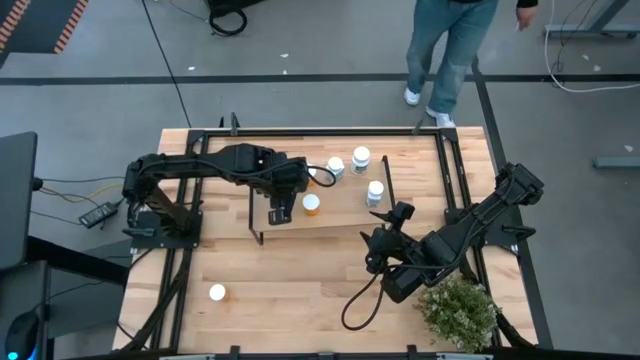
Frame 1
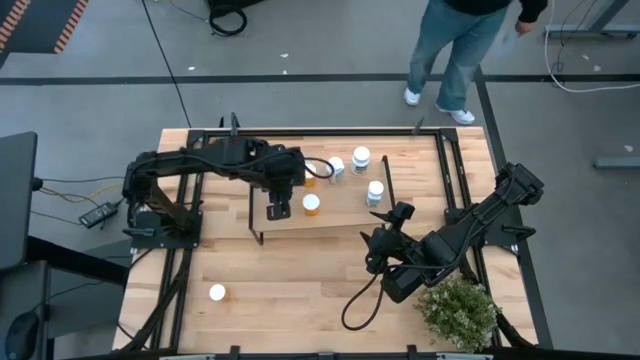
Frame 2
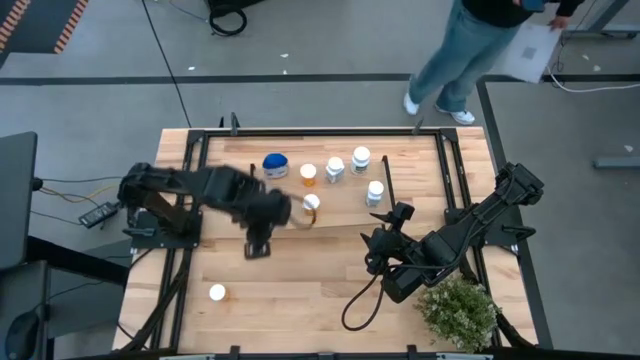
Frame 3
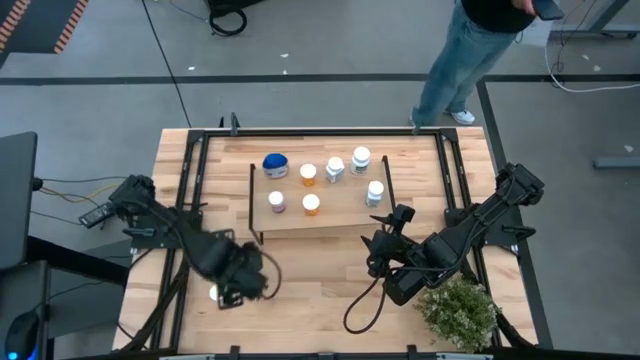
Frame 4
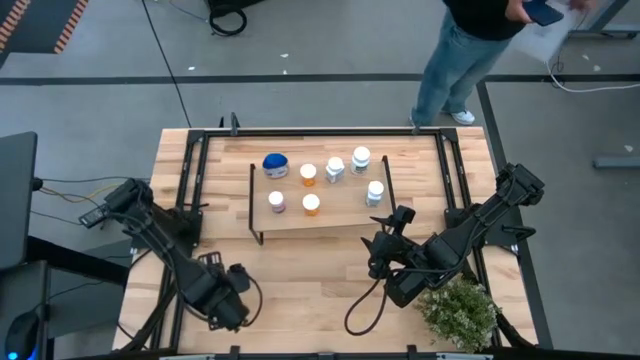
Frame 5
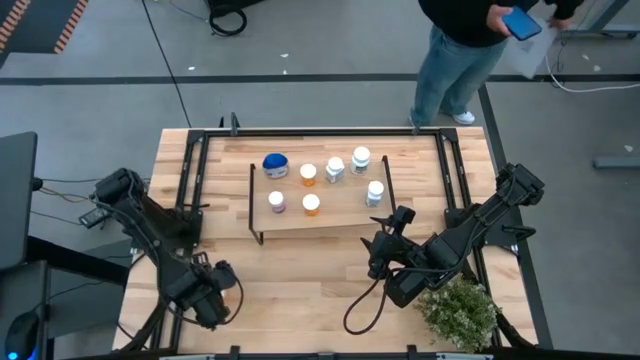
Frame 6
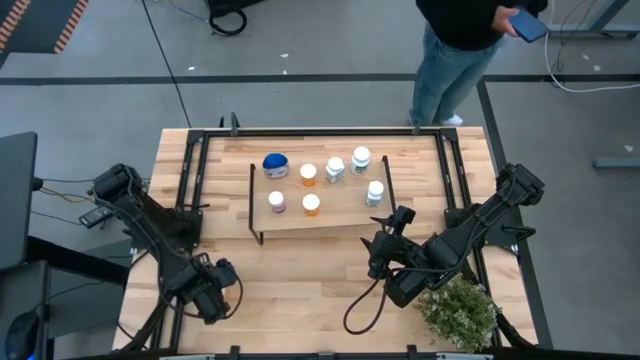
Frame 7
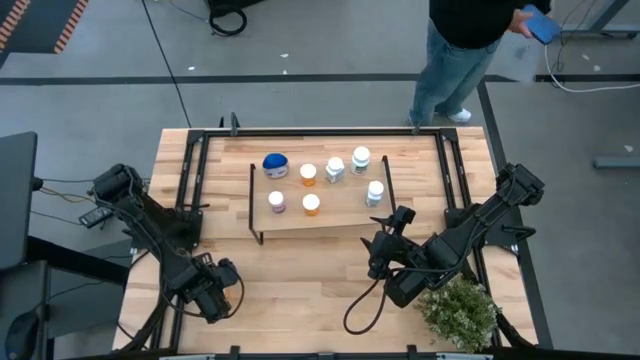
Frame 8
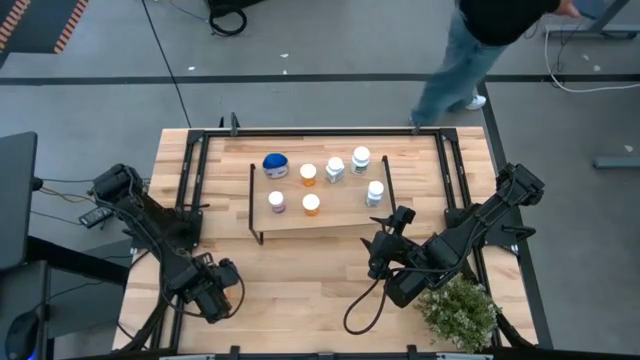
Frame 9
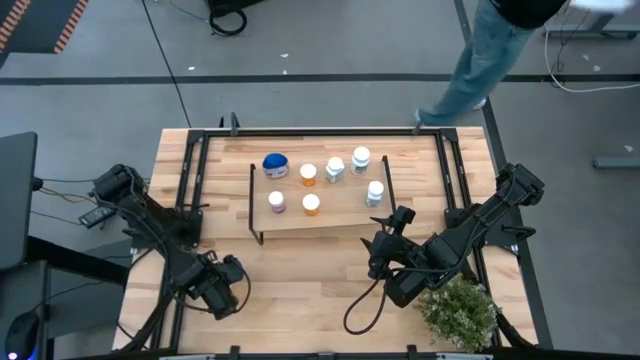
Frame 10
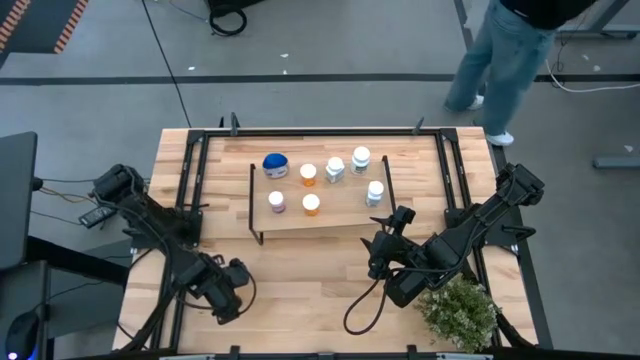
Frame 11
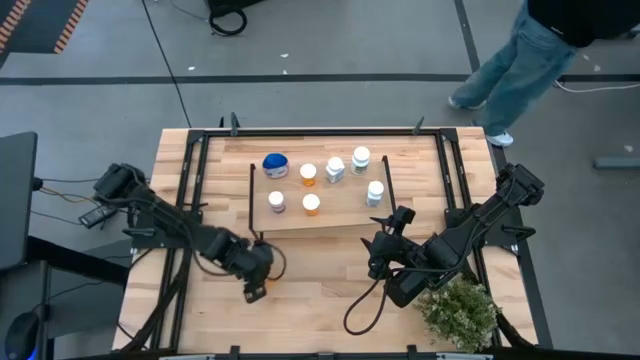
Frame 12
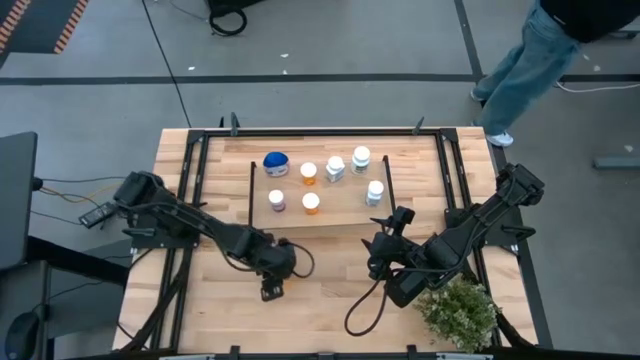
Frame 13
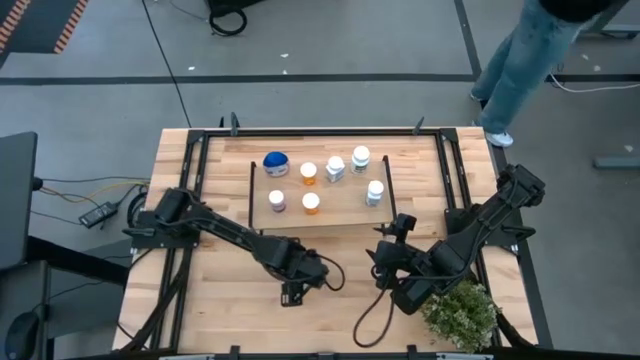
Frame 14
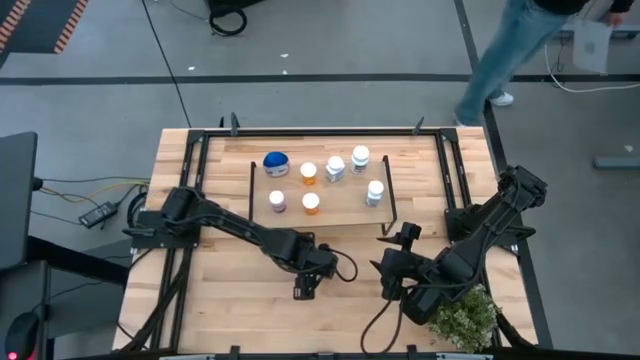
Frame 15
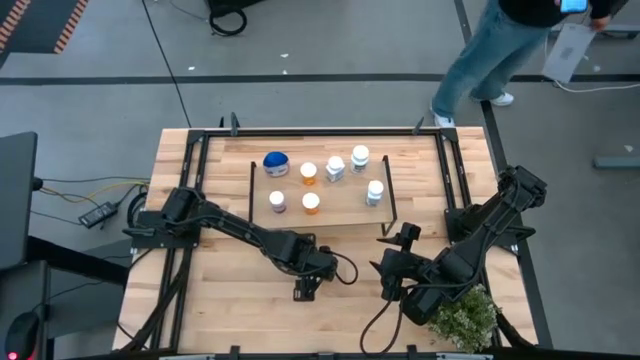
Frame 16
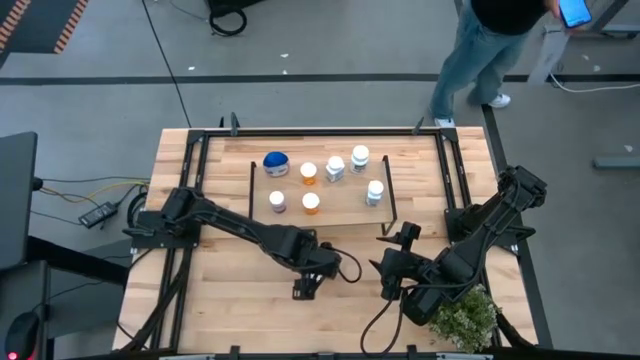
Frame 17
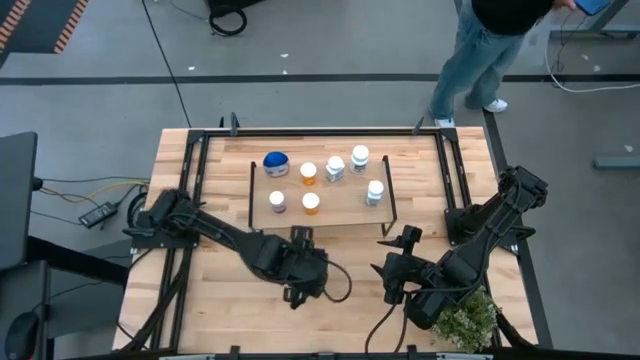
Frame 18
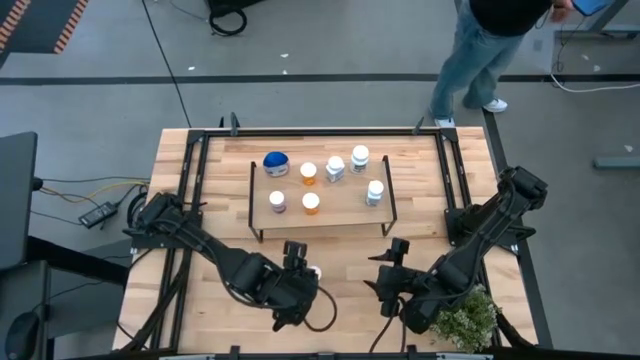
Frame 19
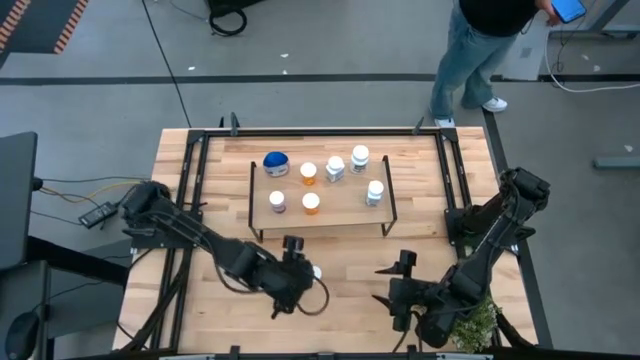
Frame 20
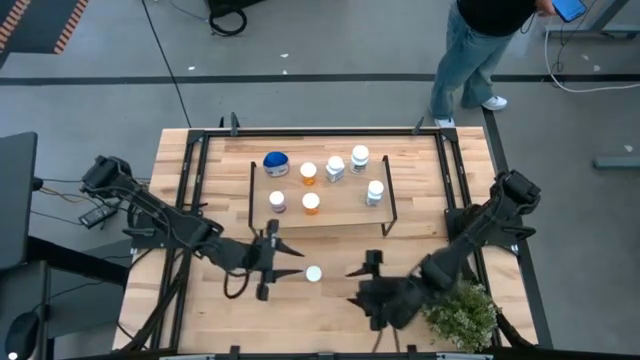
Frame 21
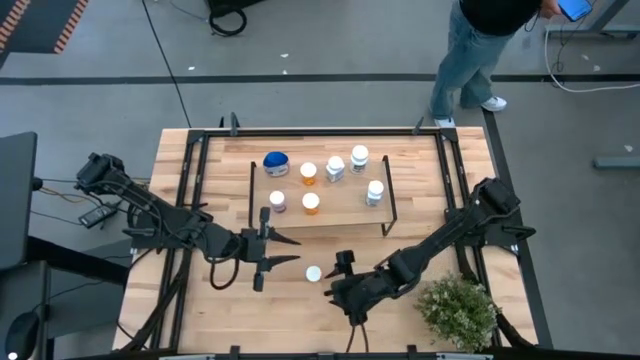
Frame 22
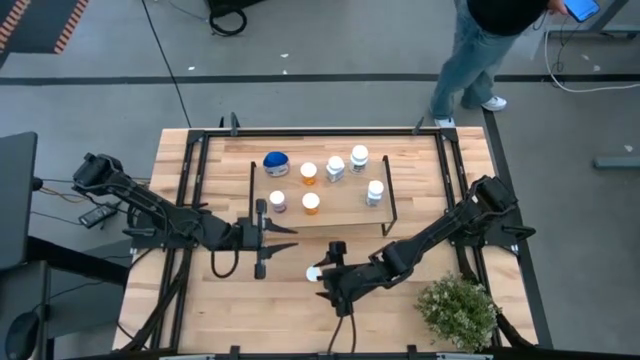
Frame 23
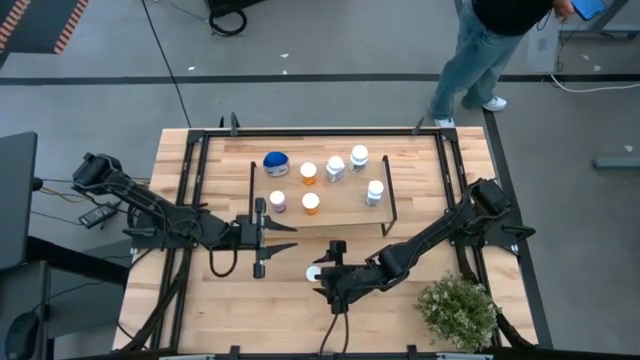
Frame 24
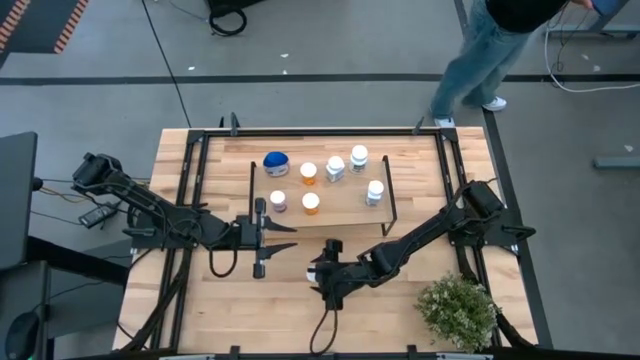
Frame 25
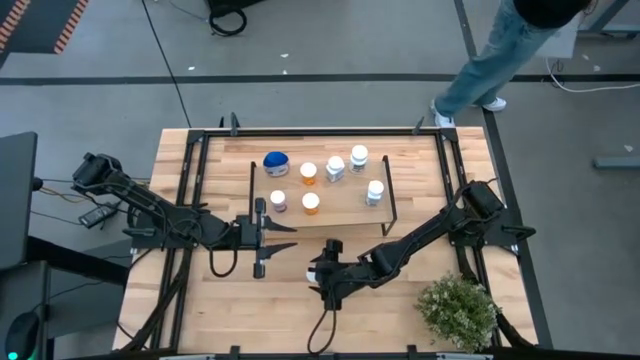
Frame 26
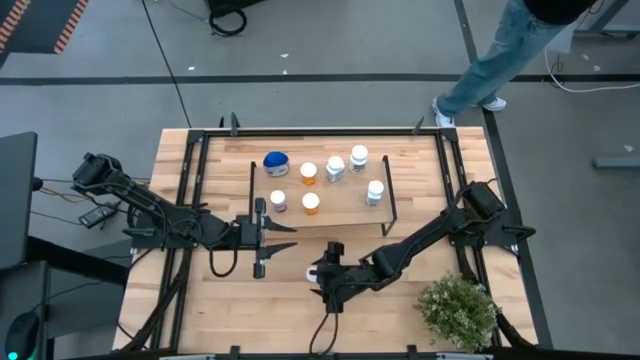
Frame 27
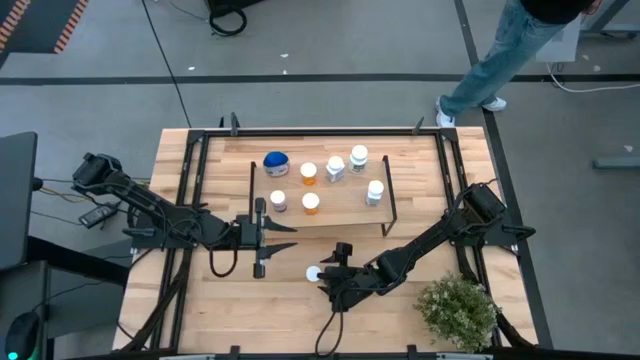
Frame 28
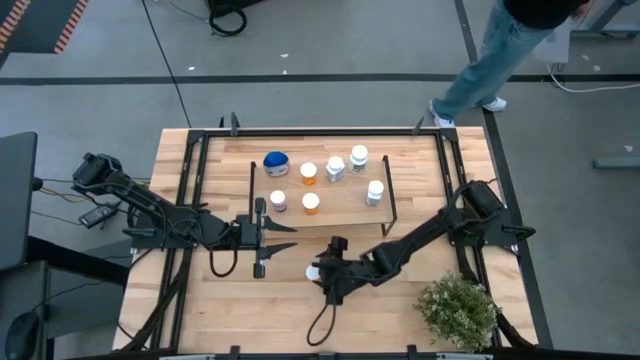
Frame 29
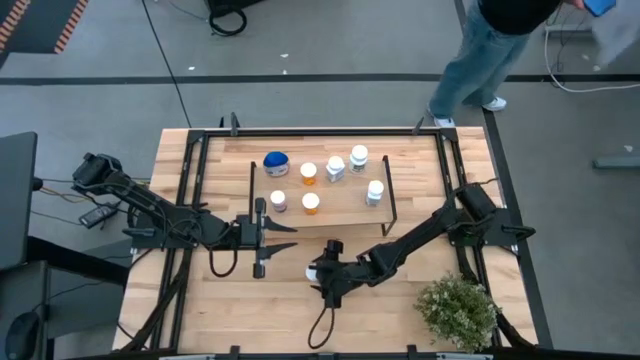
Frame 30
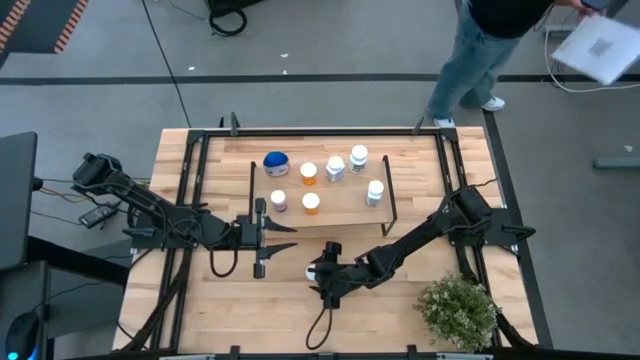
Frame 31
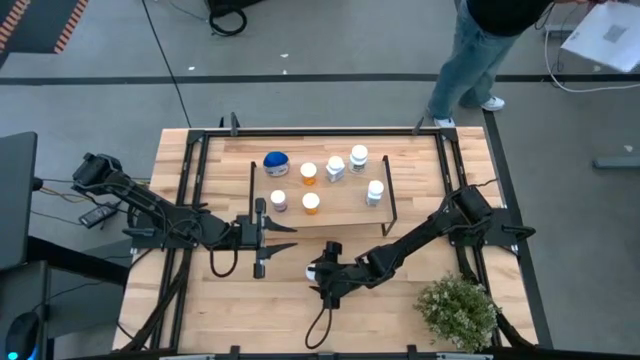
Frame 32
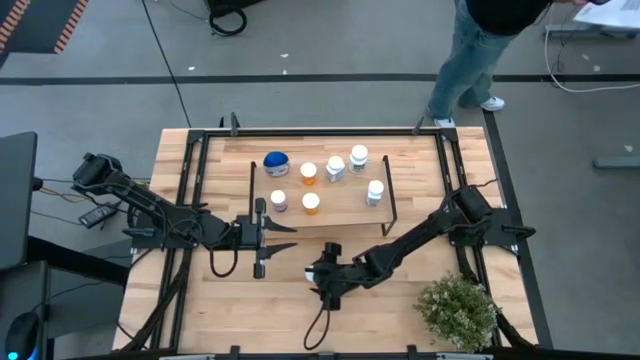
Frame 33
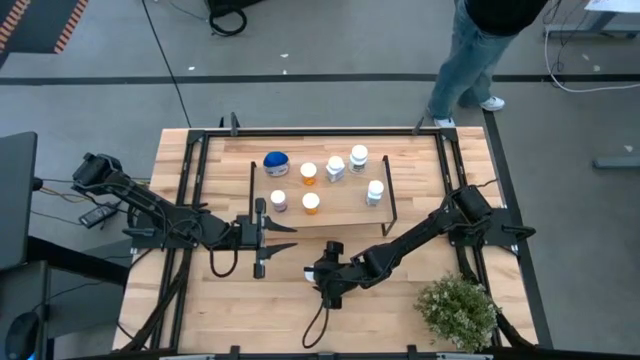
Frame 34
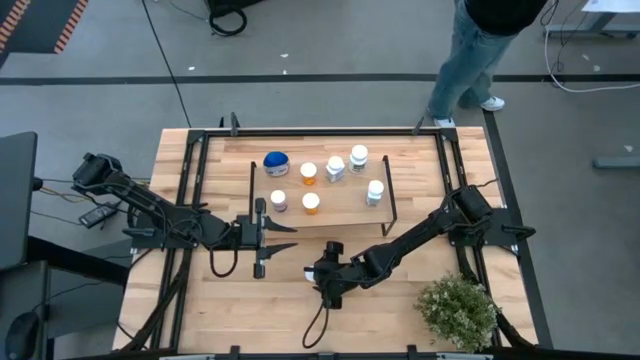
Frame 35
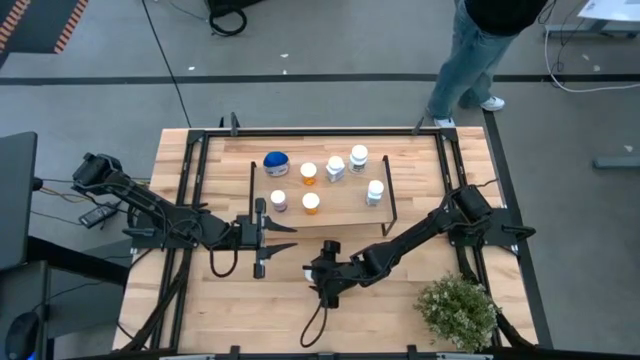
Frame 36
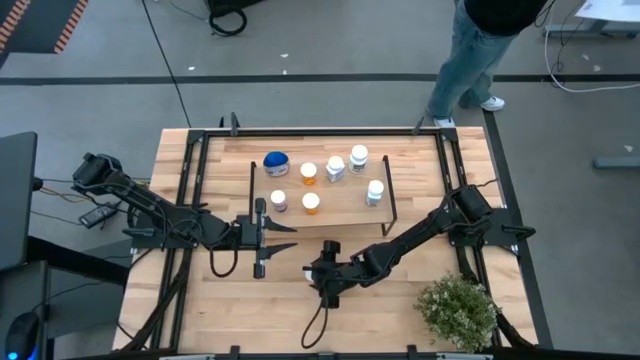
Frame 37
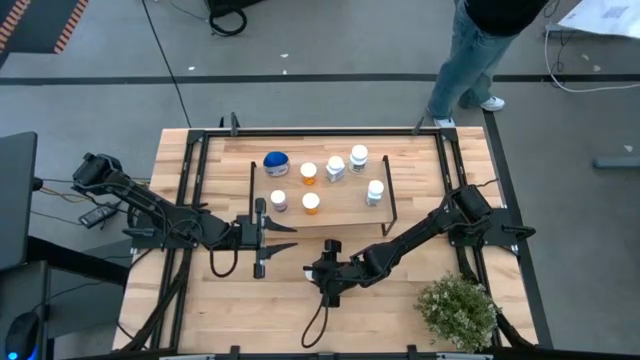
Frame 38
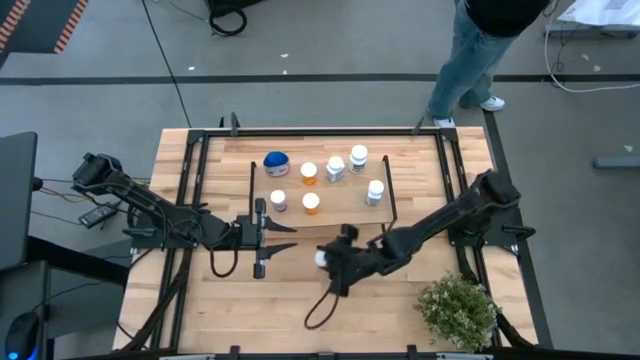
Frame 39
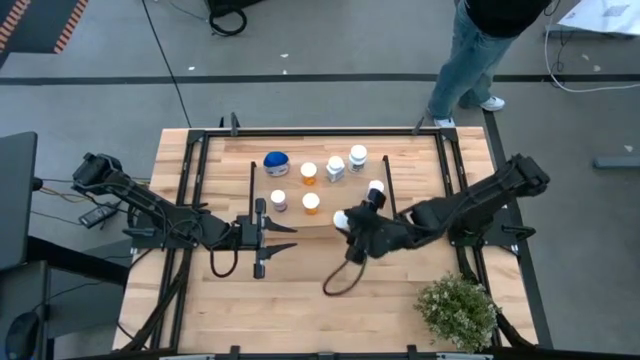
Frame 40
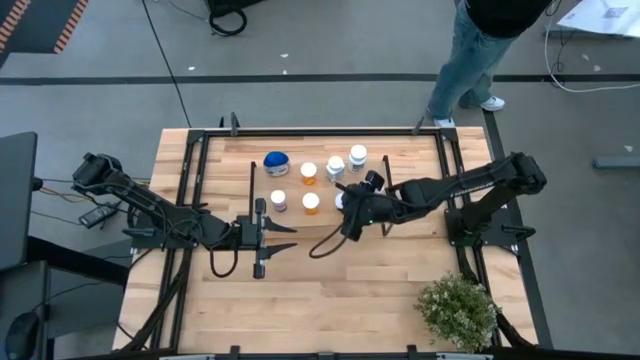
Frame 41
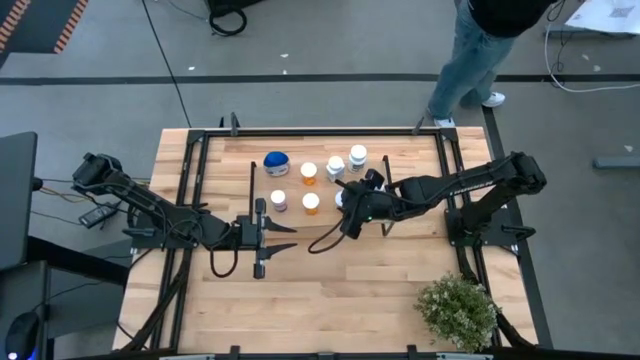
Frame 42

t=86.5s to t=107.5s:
Task: Pick and place medicine bottles onto shelf by color
Put the orange medicine bottle on the shelf

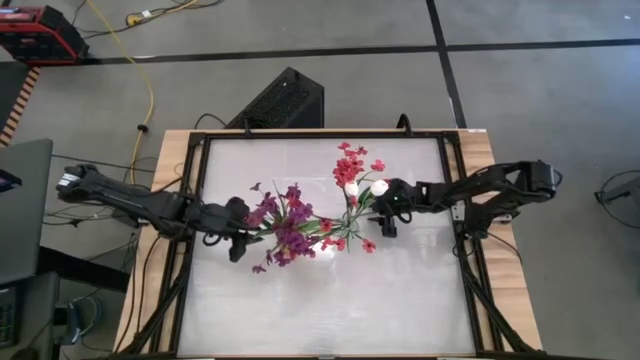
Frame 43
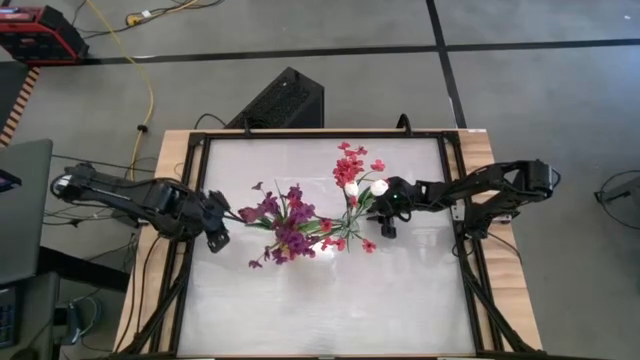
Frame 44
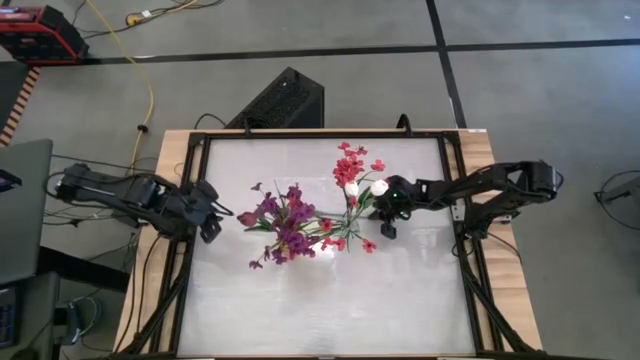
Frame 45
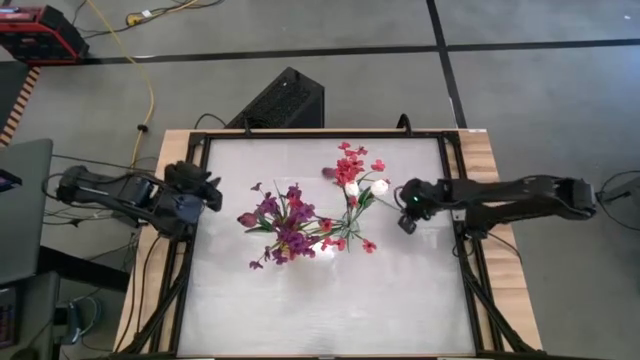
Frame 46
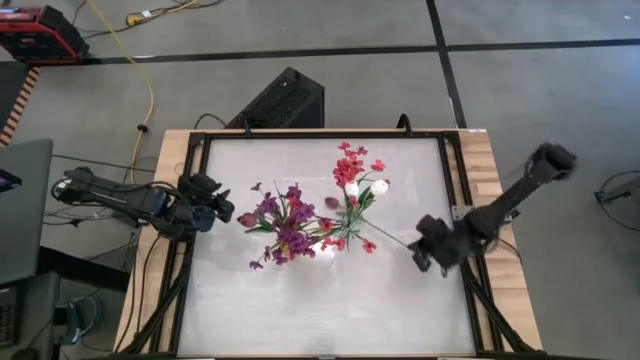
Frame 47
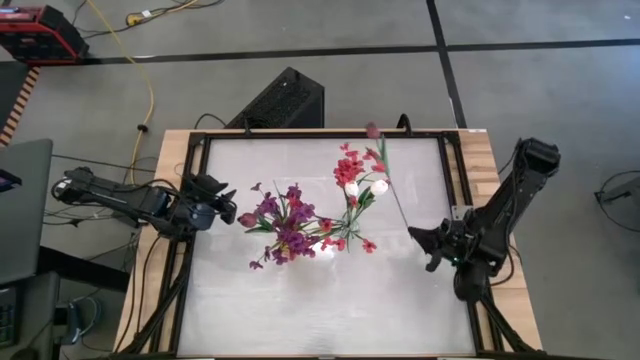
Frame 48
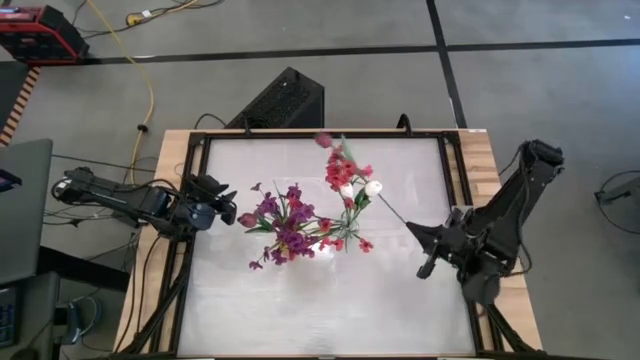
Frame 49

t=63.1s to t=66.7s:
Task: Sort flowers into vase by color
Put the violet tulip into the yellow vase
